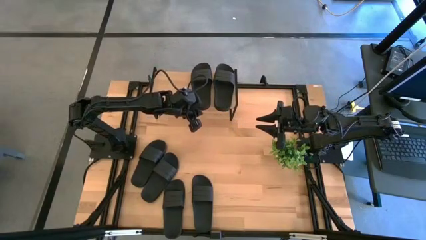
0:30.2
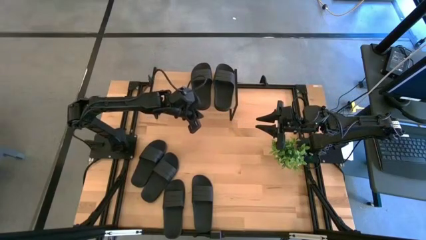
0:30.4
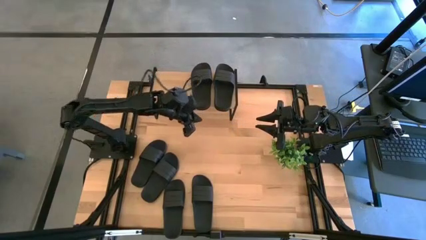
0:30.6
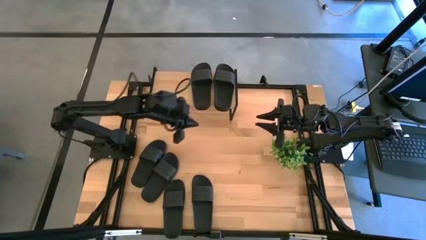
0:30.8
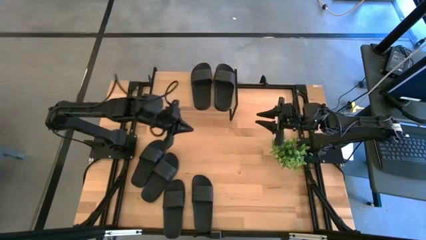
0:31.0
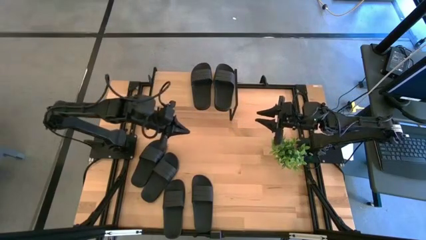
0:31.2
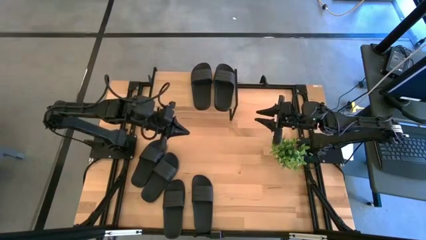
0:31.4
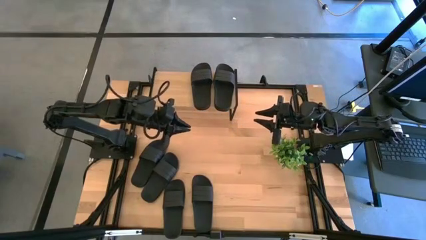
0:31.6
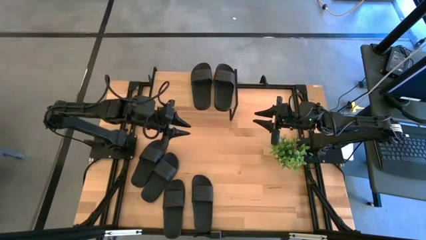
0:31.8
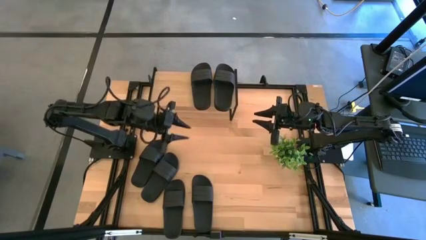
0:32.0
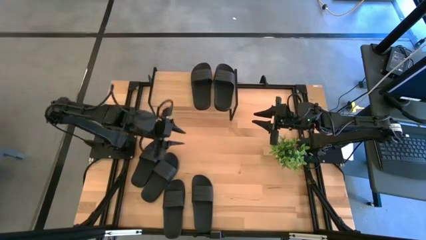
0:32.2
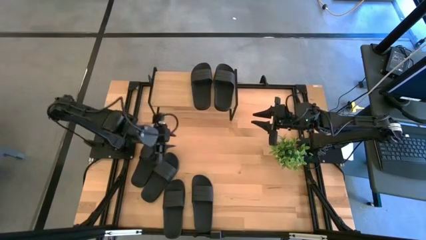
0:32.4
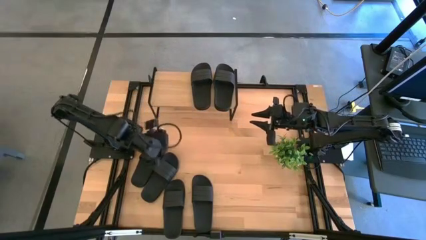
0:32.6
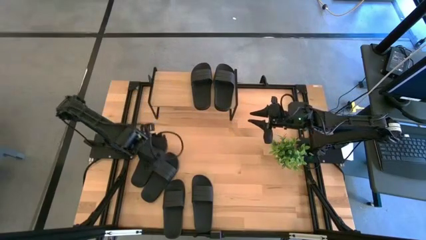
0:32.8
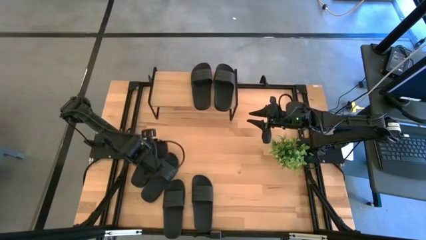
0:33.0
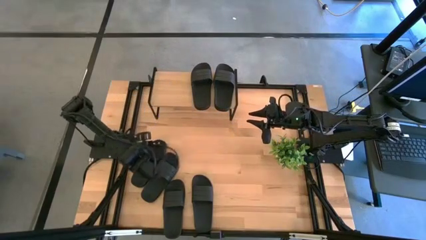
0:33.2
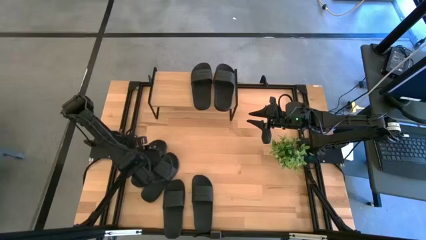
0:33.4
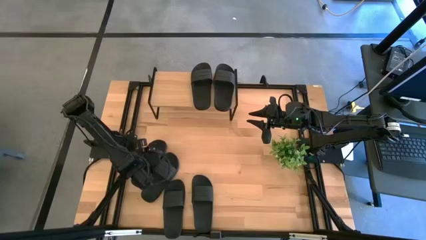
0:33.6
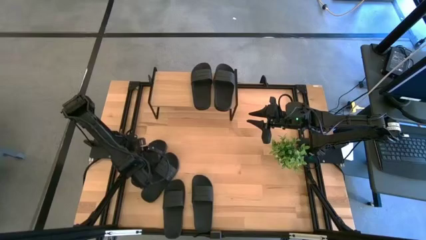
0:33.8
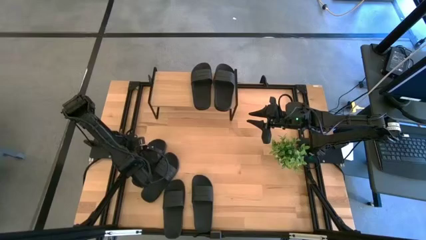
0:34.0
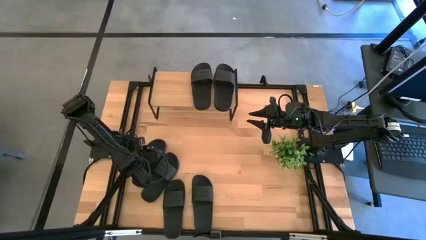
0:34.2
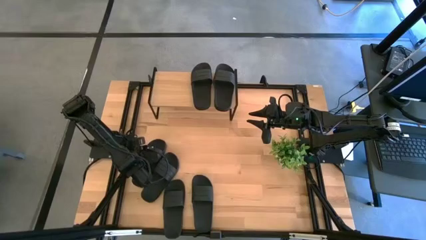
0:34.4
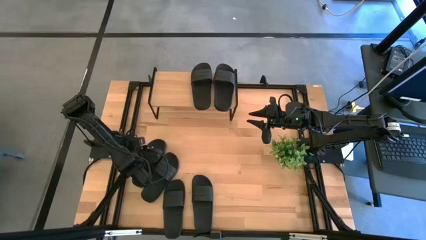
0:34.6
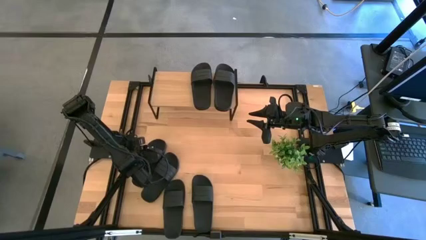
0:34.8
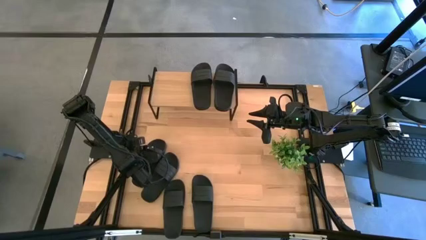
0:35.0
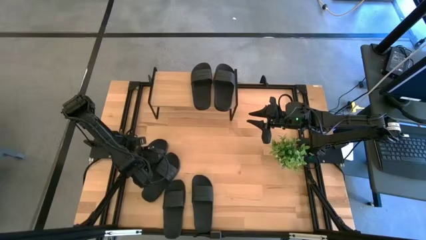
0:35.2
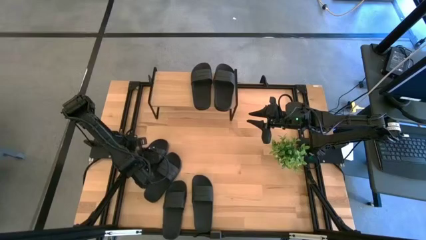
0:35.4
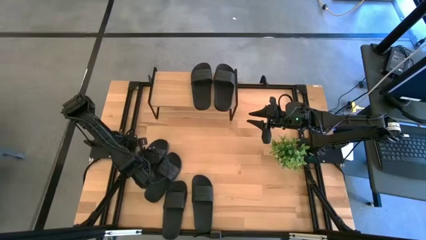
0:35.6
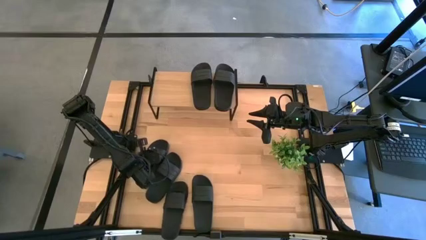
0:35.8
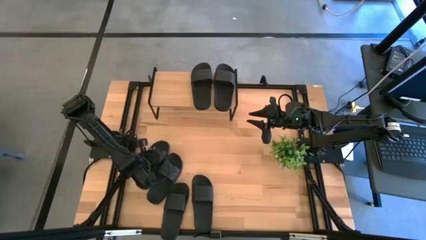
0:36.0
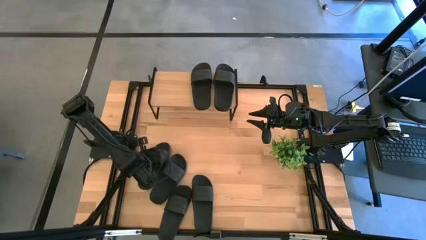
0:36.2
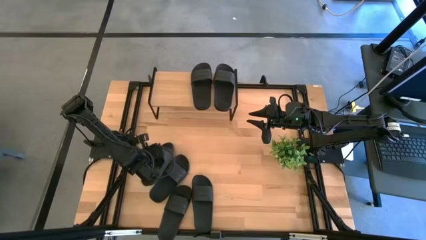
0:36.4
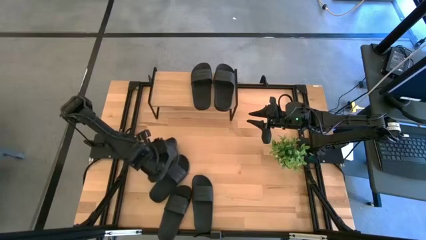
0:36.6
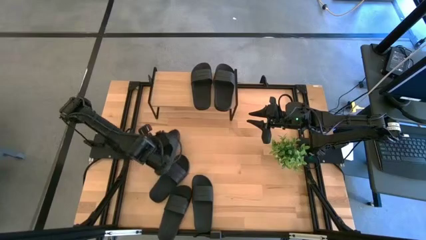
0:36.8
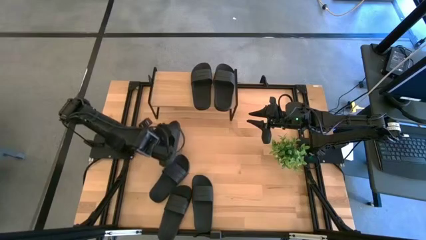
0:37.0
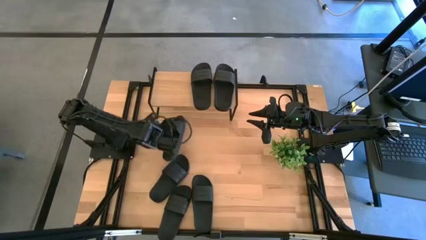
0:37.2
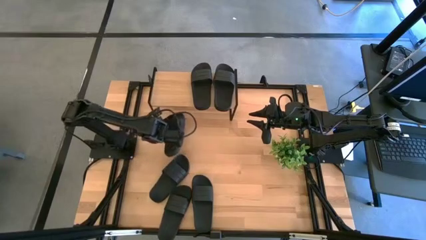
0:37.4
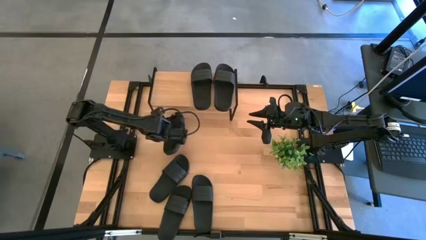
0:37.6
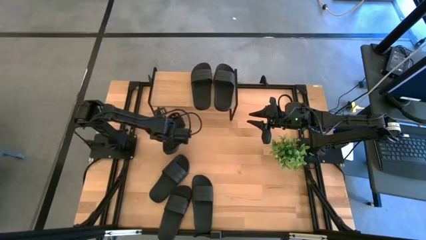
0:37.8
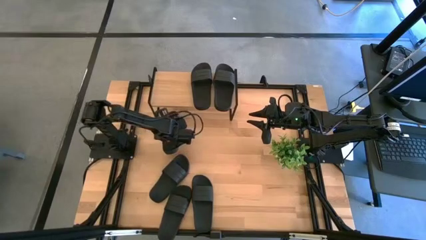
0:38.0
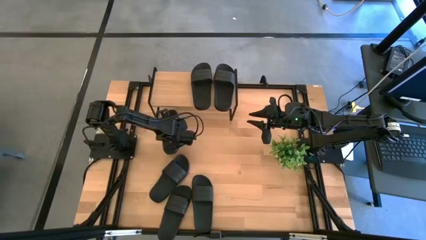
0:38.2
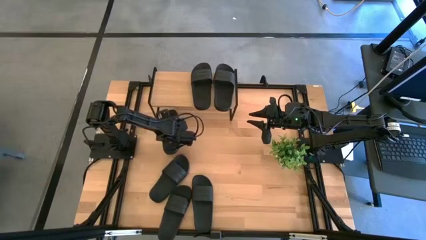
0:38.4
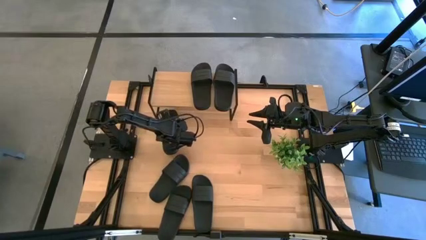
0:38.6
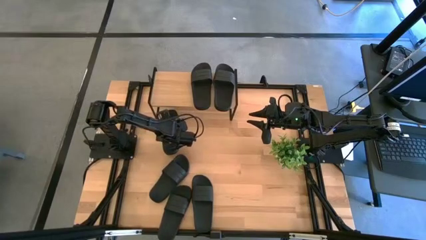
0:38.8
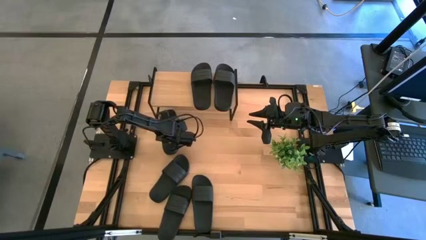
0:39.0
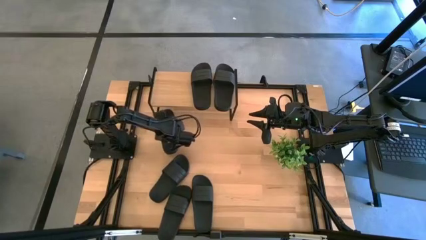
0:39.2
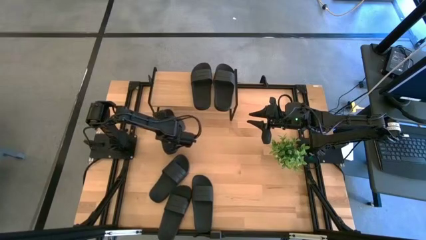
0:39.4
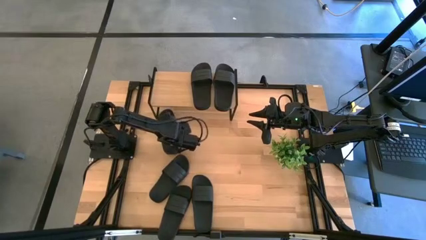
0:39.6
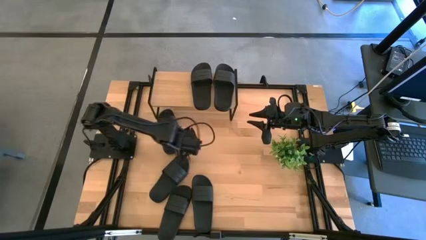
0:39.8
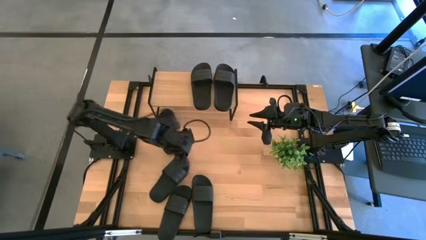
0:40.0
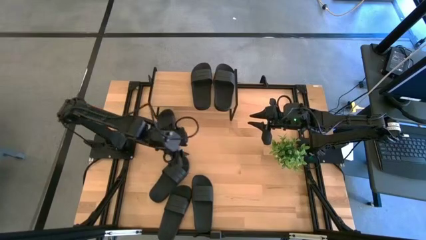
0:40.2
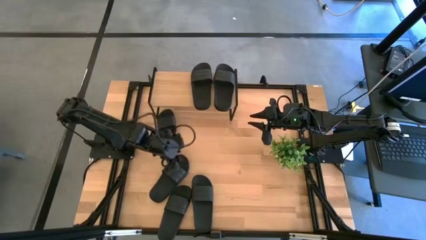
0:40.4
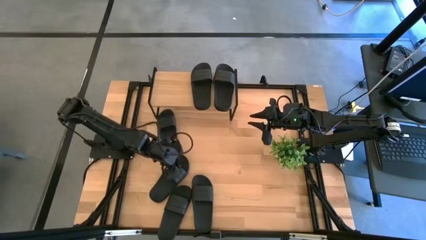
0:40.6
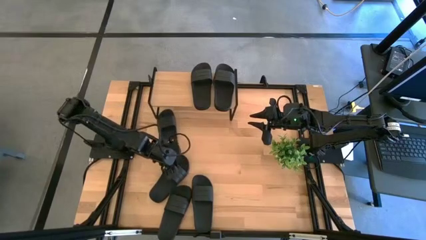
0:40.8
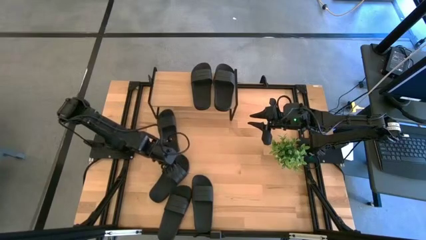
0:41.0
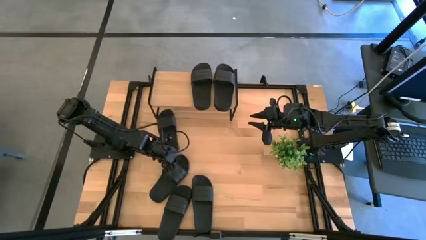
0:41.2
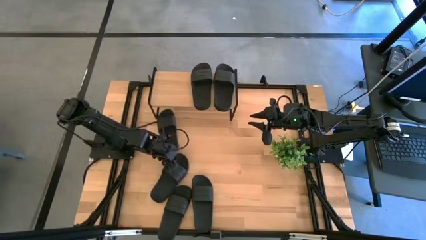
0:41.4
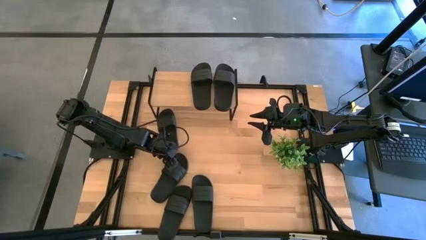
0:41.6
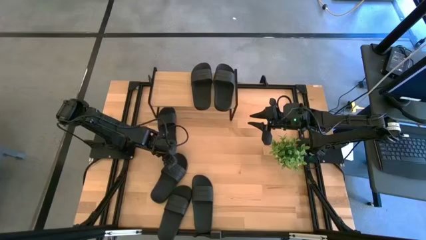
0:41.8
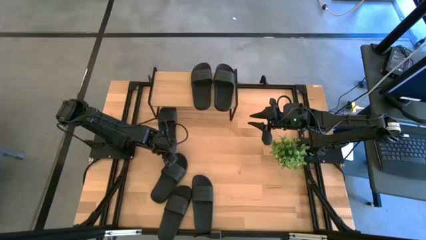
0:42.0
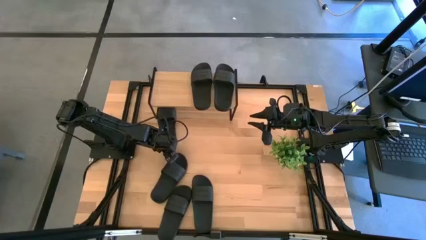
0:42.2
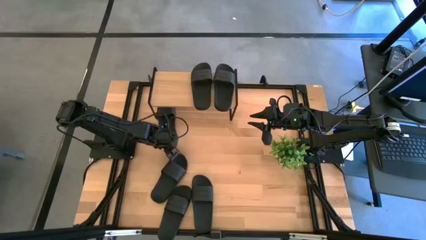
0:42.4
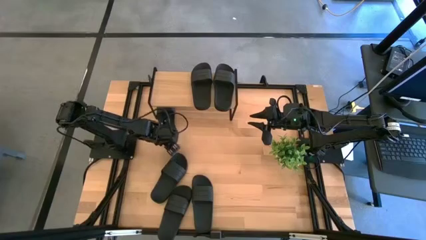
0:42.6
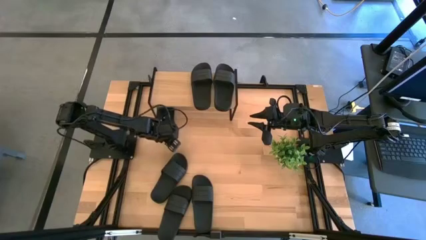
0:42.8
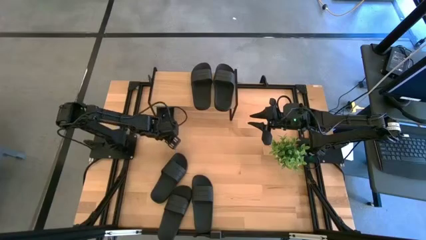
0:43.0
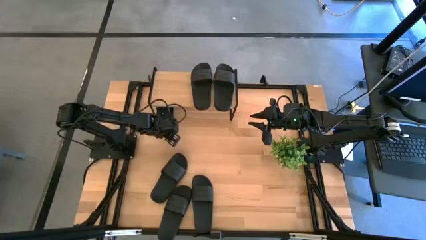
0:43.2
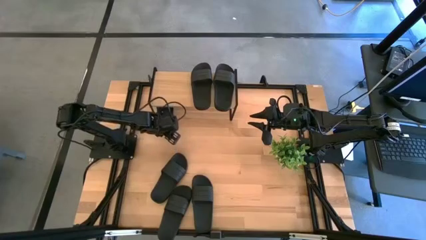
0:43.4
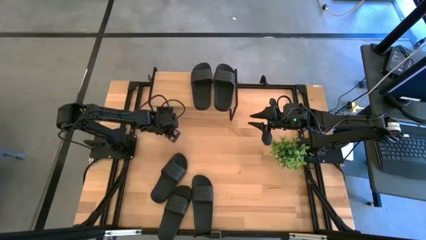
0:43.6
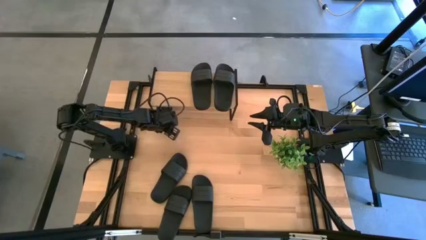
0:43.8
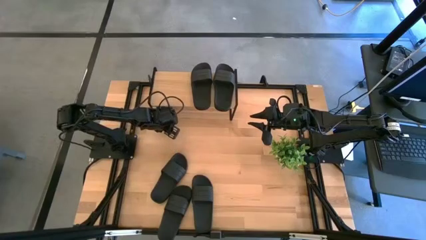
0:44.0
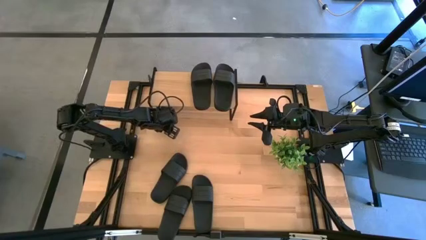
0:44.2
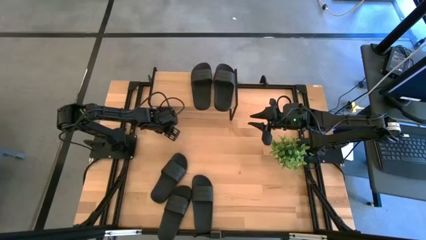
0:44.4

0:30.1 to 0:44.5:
Task: Pick and place slides into the shelf
Put the black slipper under the shelf

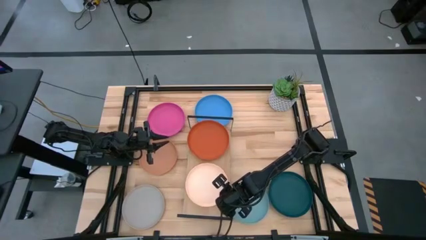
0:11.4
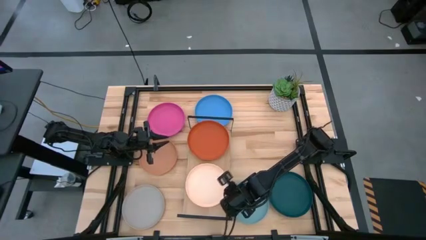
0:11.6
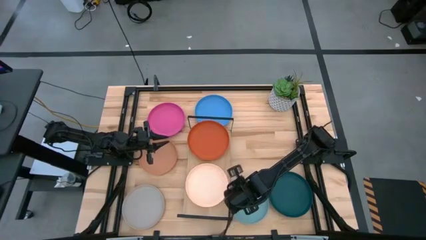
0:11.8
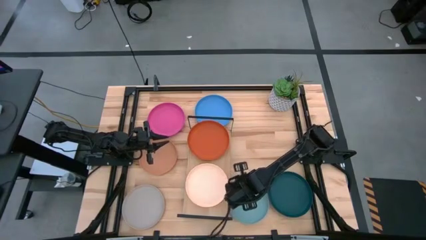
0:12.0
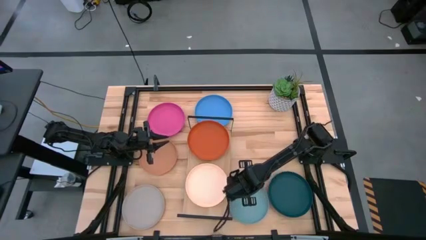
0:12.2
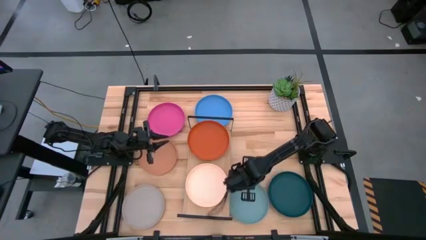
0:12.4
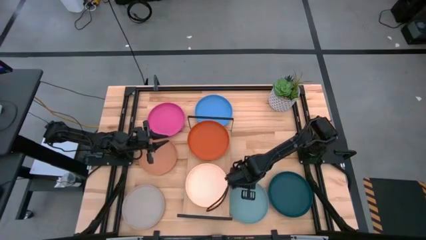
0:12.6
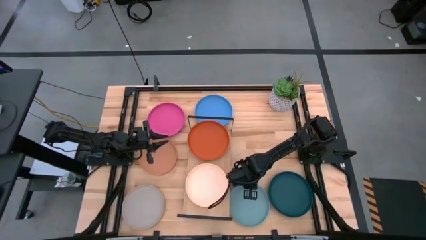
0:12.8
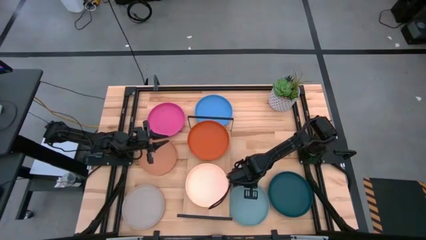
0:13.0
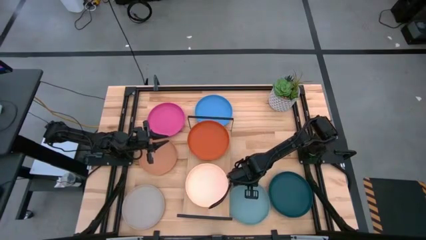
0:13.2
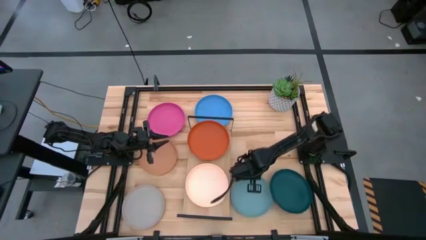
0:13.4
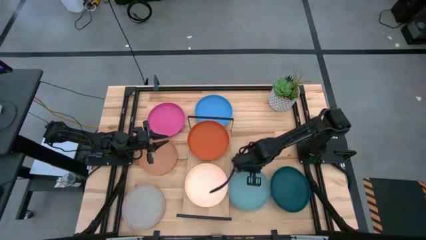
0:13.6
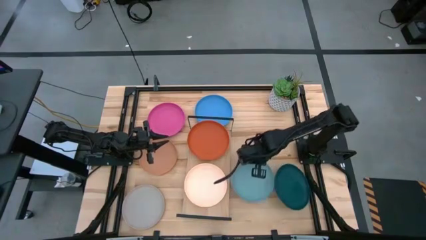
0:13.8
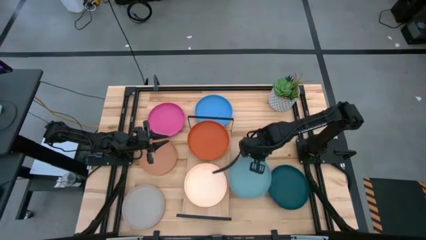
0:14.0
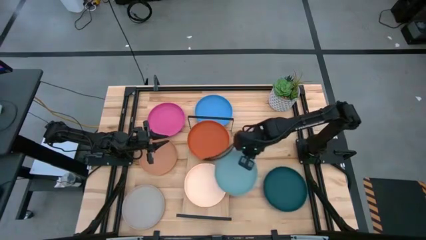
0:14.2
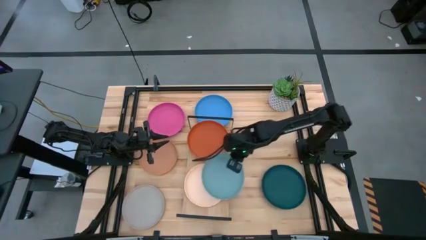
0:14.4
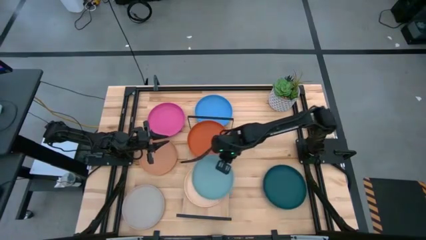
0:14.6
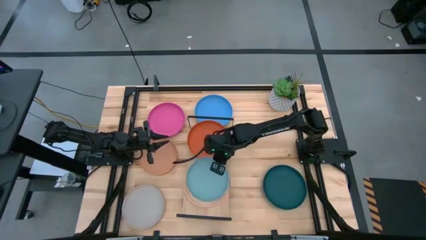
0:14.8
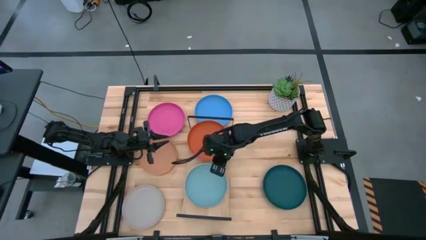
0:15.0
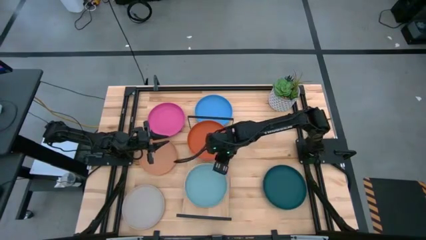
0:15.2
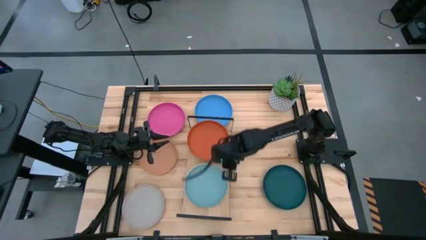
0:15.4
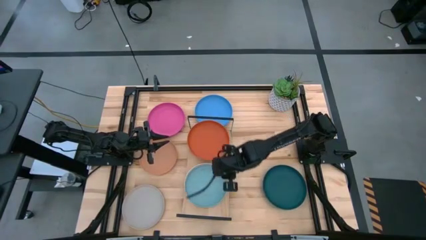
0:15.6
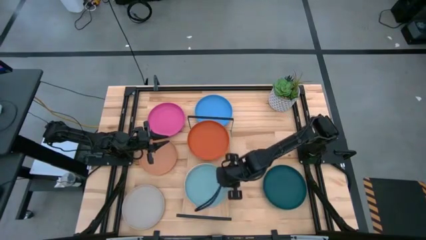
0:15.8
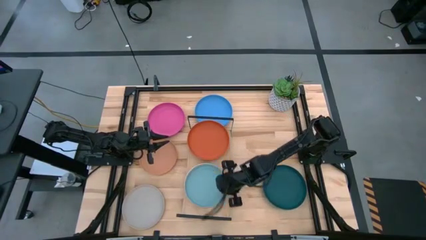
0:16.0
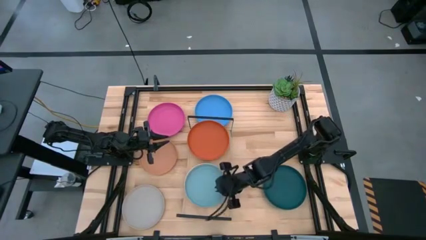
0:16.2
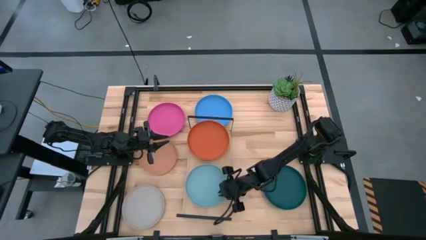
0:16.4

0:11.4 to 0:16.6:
Task: Place and stack plates onto a shelf
Stack the light blue plate on top of the white plate on the shelf
